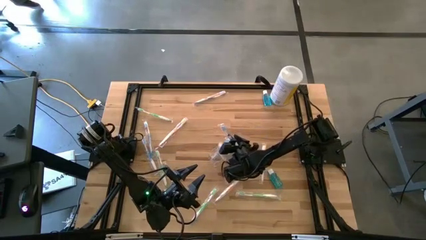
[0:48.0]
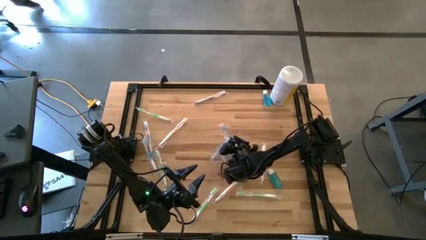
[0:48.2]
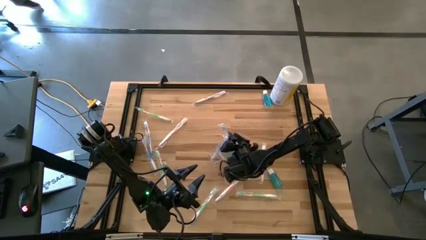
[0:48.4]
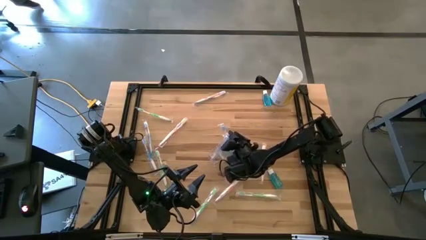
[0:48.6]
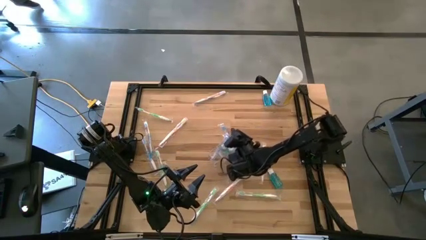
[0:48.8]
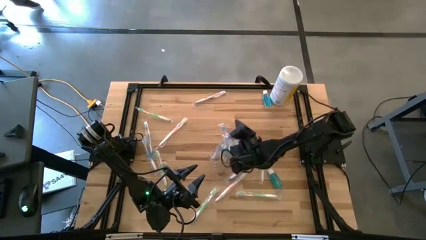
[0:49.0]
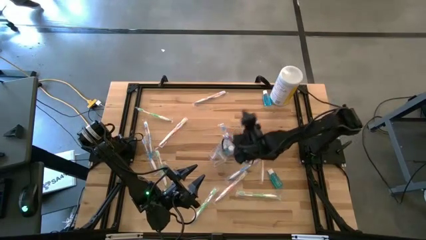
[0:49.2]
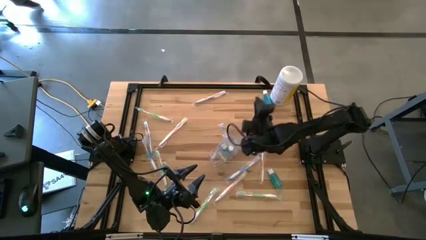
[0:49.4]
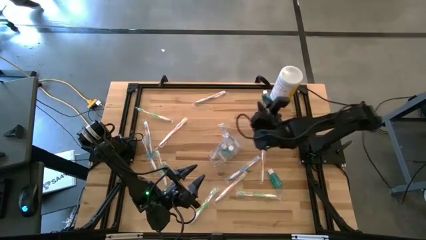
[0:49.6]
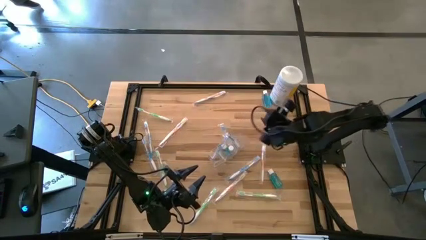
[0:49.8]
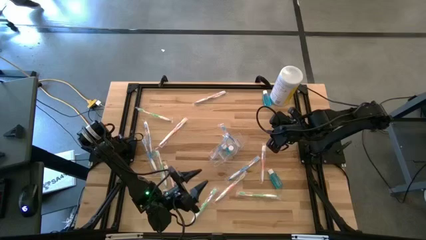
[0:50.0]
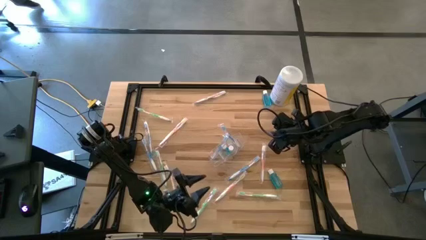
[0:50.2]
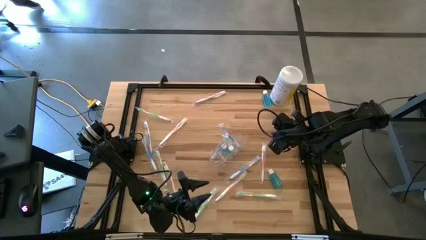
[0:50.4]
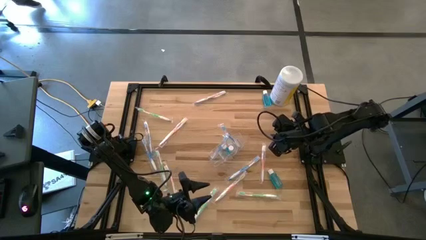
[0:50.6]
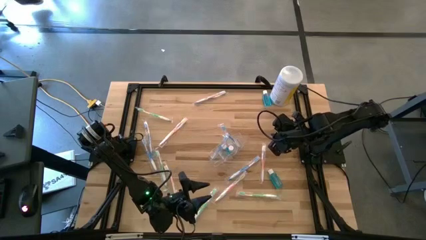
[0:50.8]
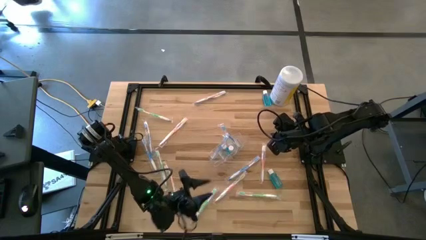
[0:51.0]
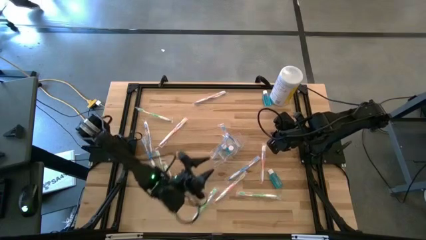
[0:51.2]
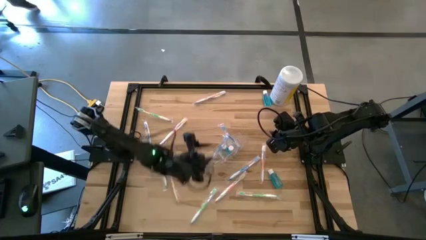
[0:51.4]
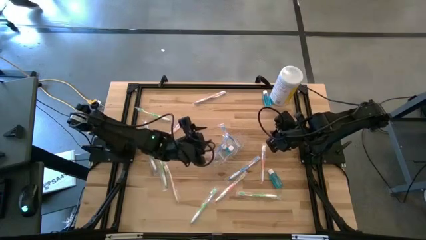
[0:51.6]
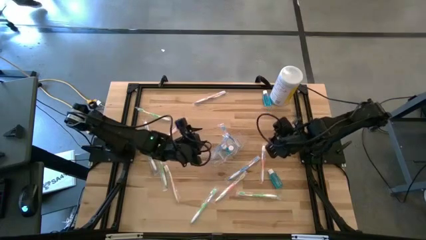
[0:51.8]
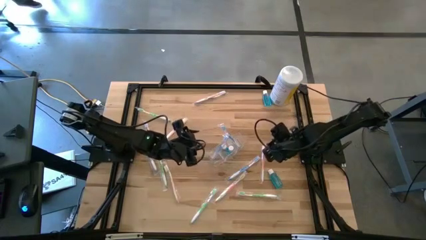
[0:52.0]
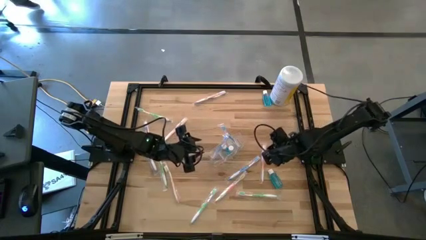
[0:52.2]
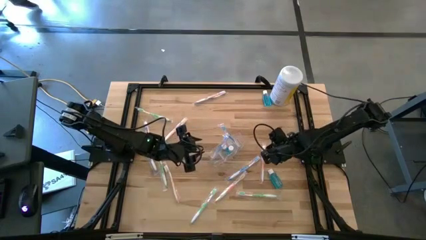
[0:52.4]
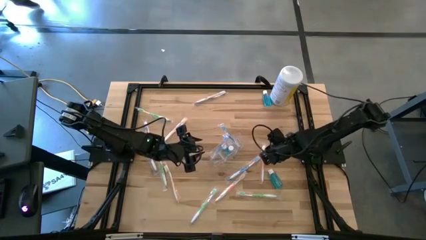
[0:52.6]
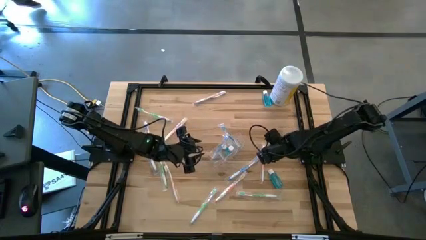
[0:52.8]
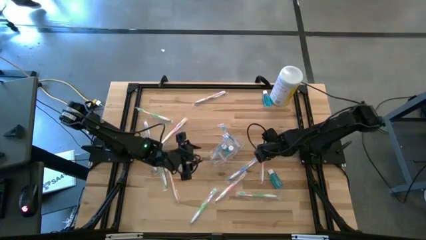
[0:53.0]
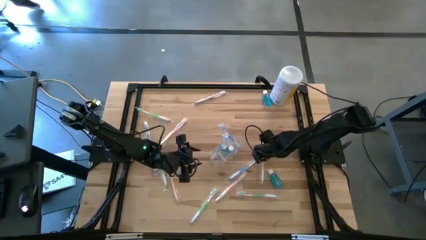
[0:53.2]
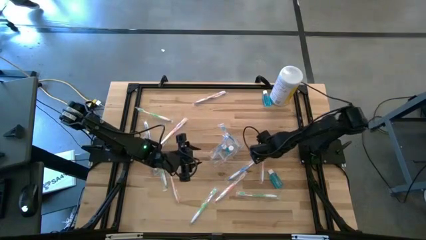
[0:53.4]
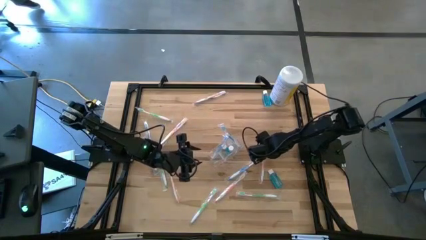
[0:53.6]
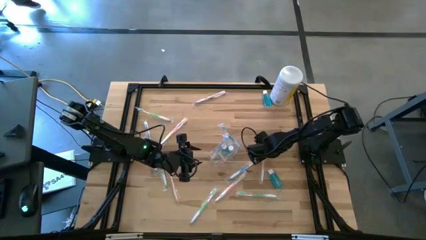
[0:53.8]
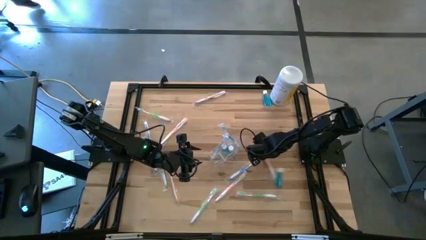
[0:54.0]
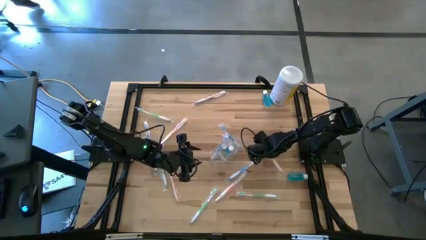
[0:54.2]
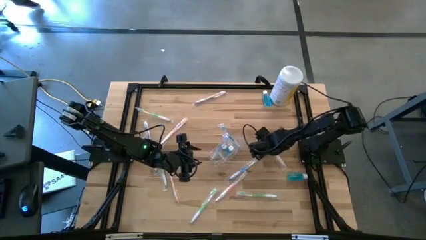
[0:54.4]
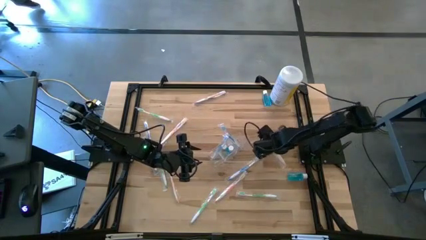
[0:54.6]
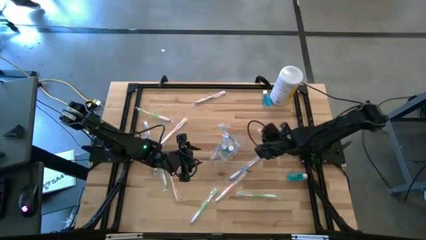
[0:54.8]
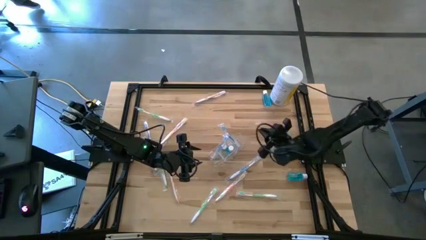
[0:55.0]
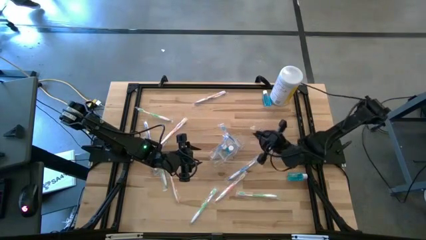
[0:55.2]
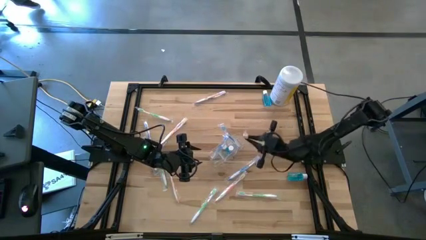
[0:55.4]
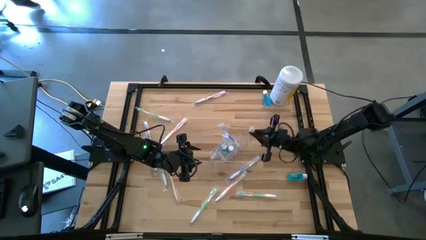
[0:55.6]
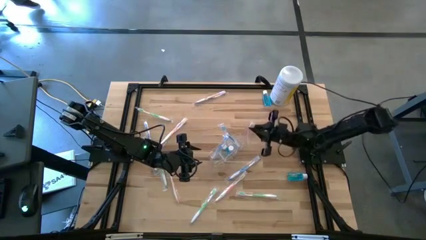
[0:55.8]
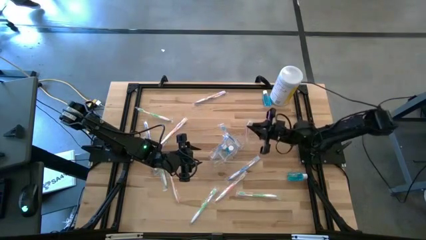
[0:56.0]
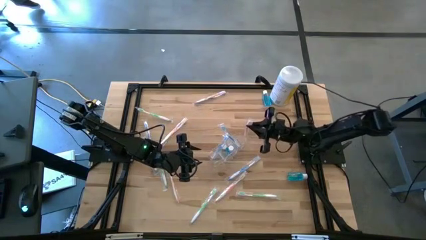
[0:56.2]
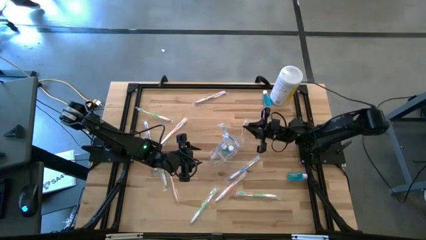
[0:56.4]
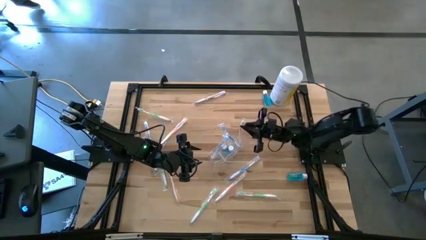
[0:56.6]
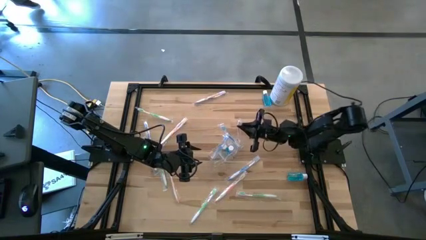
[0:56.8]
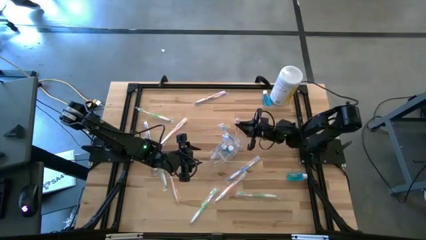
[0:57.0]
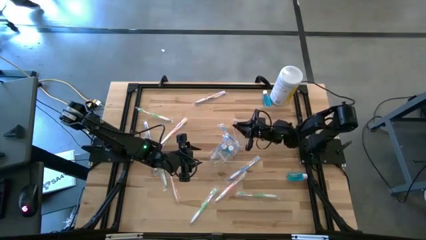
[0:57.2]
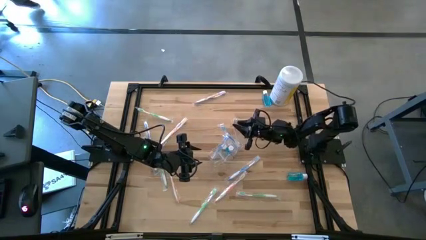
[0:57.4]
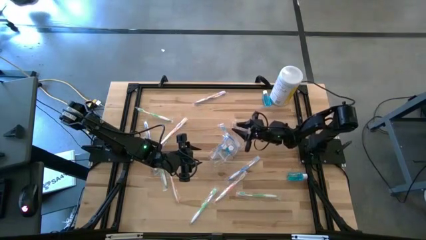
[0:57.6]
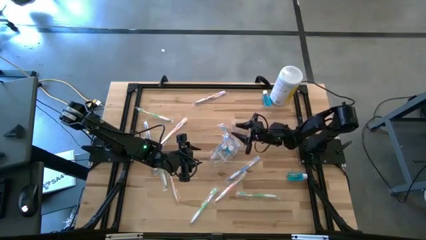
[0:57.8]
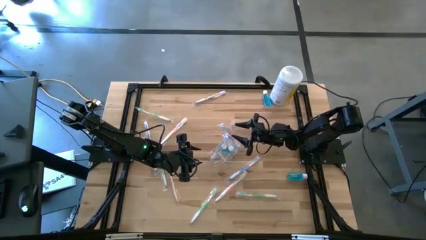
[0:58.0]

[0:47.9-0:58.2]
Task: Pick & Place toothbrushing station
Put the orange toothbrush into the transparent organizer

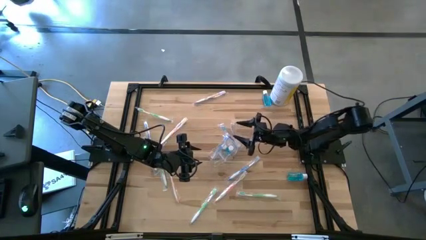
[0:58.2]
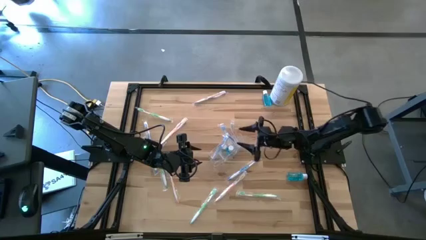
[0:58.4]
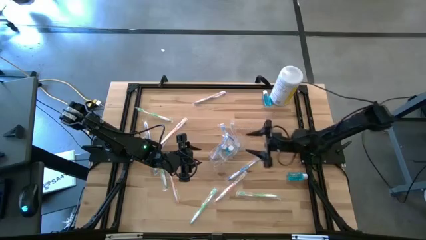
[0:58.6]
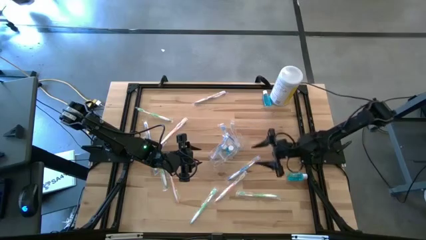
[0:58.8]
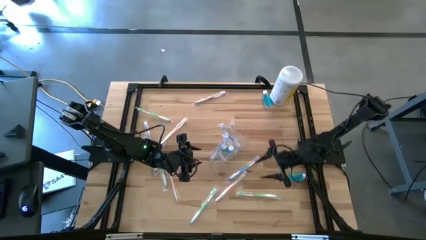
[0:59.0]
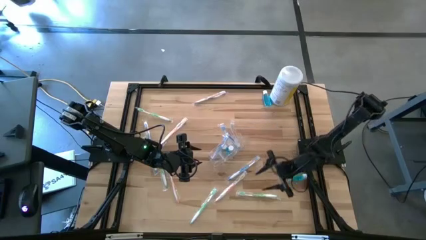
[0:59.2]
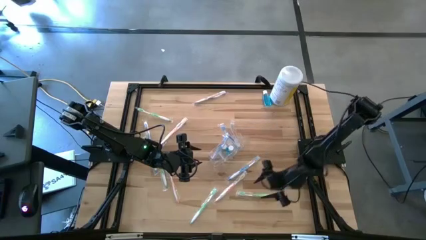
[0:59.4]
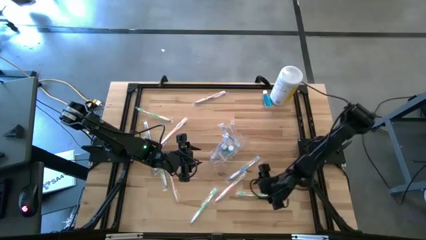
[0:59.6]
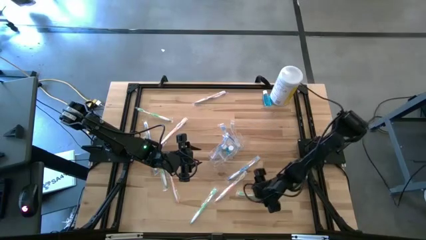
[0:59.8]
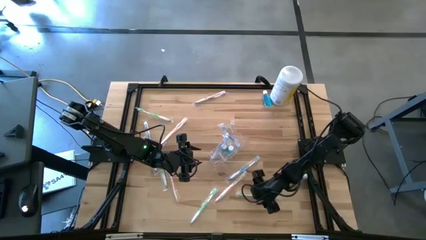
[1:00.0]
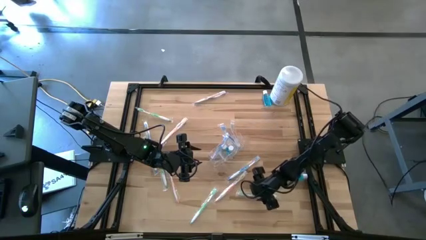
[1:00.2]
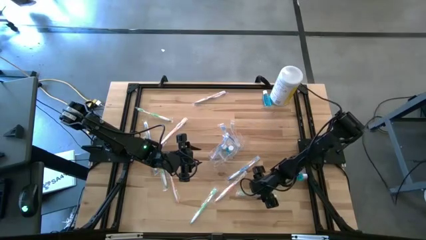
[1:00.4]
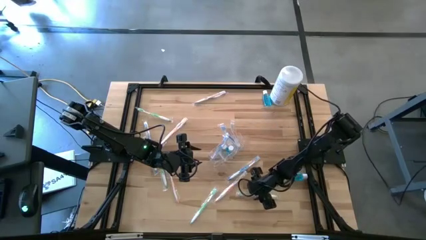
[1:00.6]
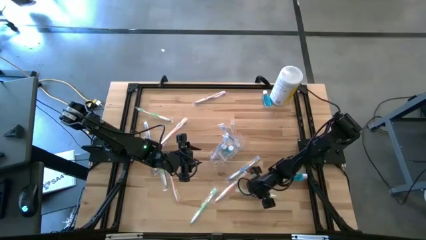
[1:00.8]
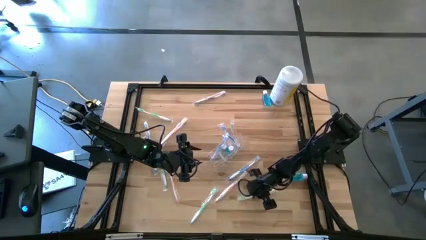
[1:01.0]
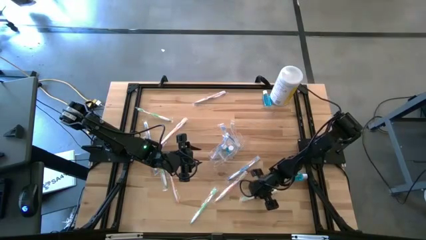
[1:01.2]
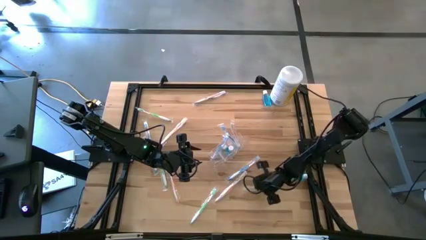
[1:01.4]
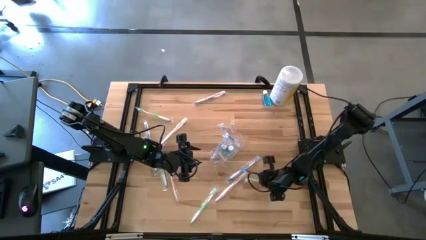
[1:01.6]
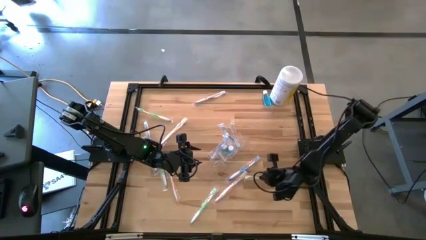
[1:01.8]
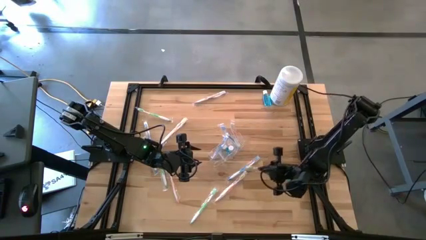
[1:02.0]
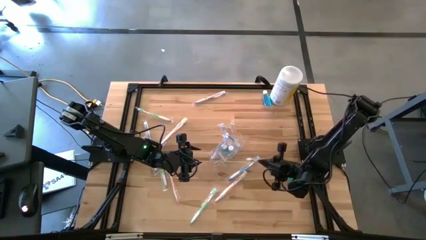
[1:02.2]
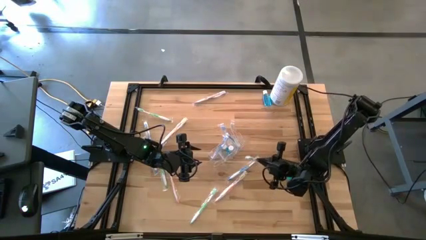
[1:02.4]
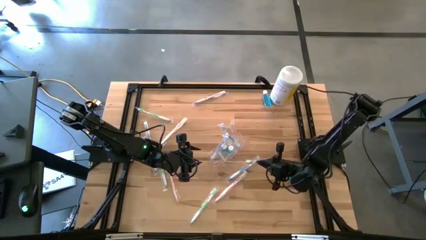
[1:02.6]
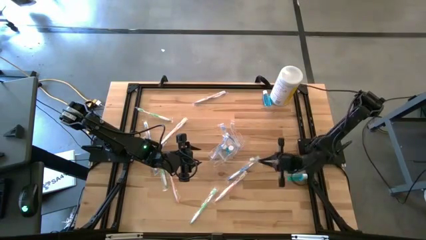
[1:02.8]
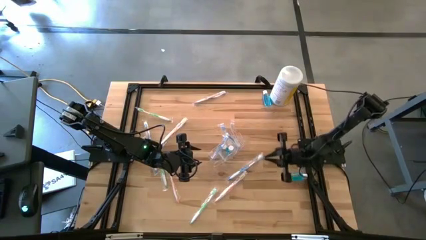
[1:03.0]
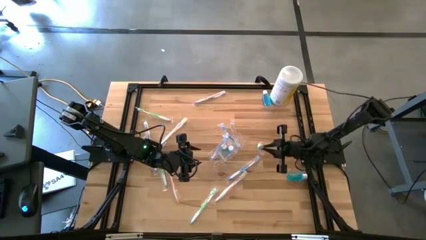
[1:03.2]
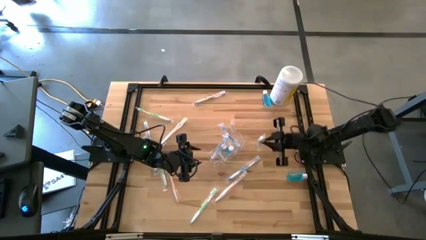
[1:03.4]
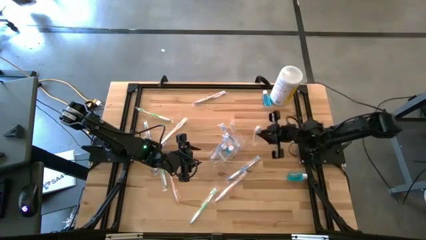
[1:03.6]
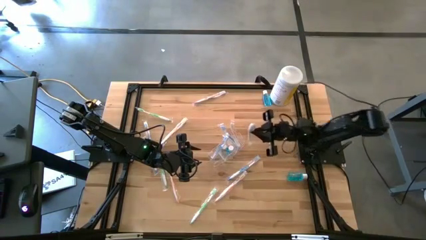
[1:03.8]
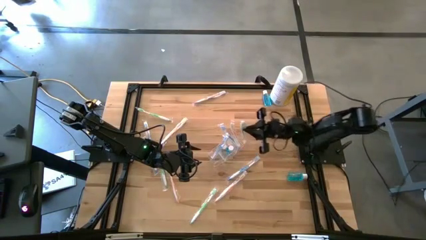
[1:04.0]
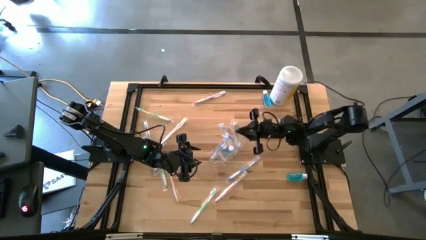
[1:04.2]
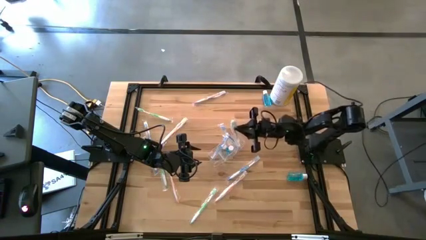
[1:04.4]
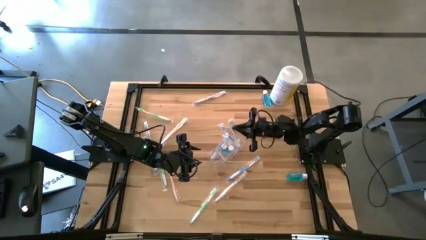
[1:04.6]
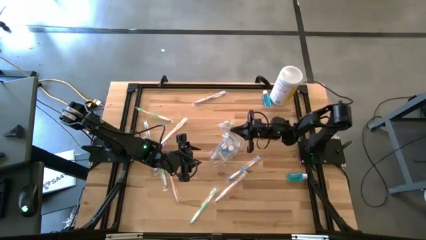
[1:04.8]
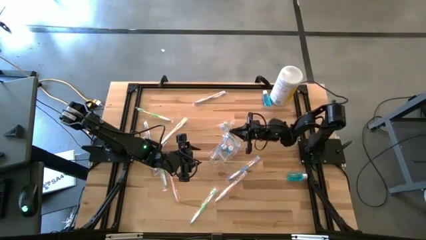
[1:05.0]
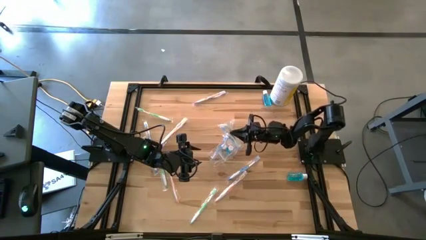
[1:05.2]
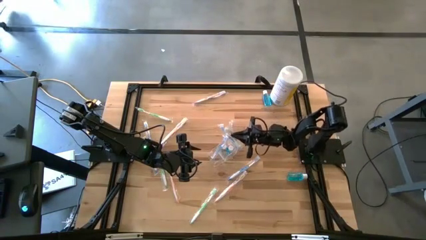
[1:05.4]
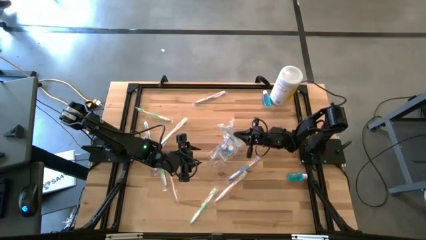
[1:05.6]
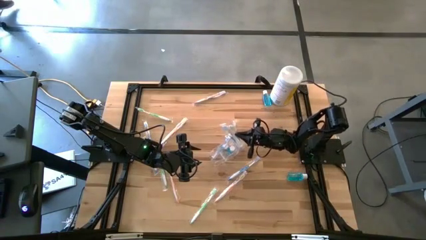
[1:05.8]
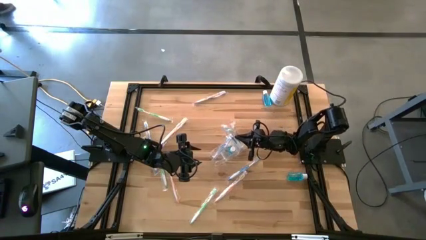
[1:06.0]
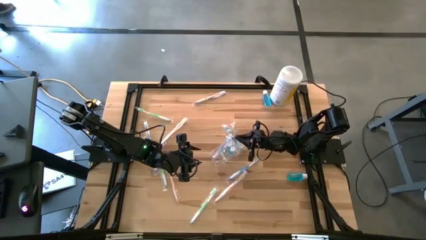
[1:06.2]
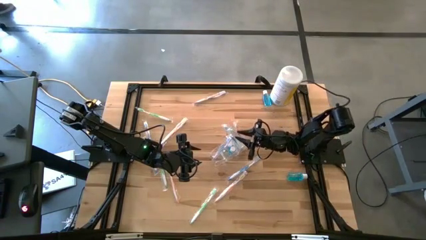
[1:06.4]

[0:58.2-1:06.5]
Put the green toothbrush into the transparent organizer
